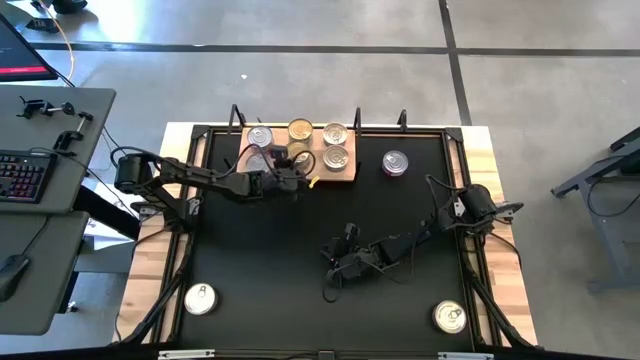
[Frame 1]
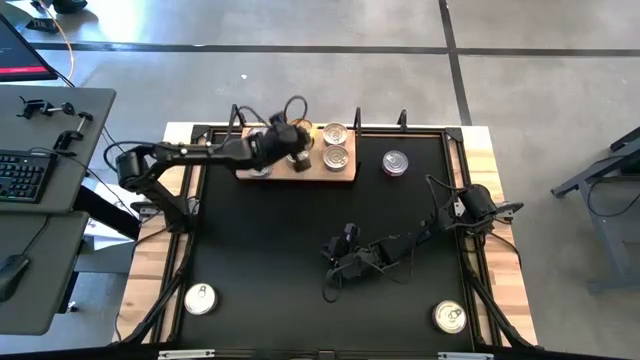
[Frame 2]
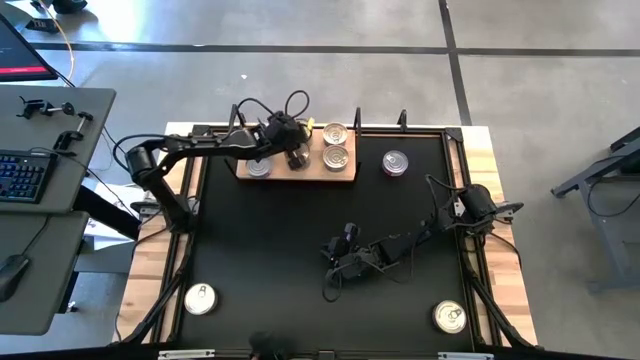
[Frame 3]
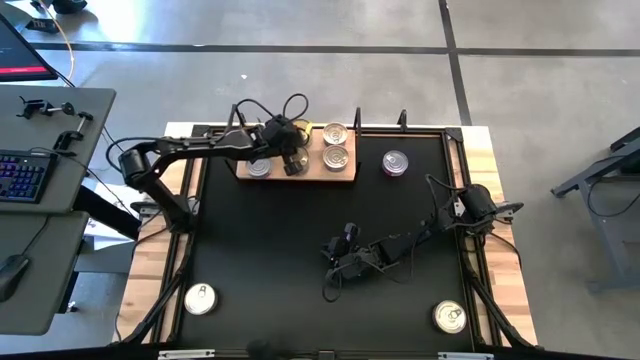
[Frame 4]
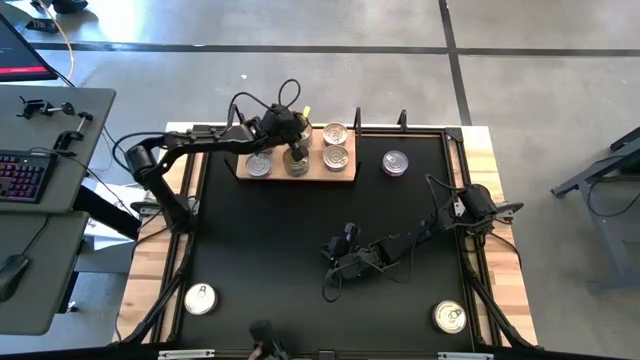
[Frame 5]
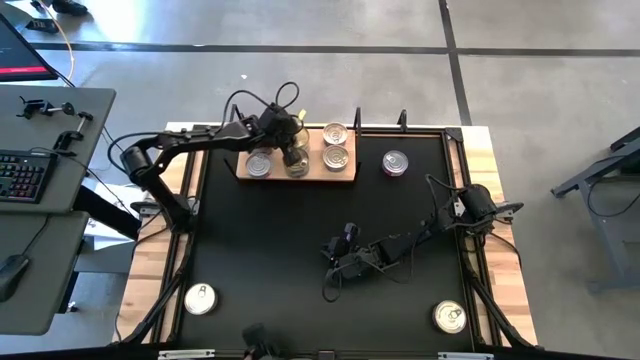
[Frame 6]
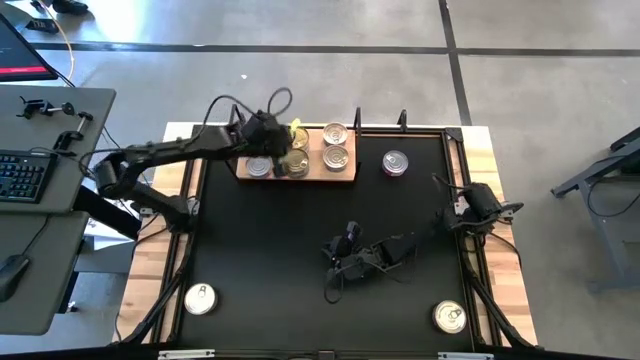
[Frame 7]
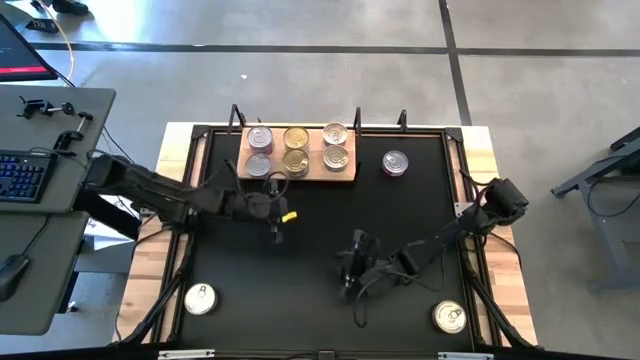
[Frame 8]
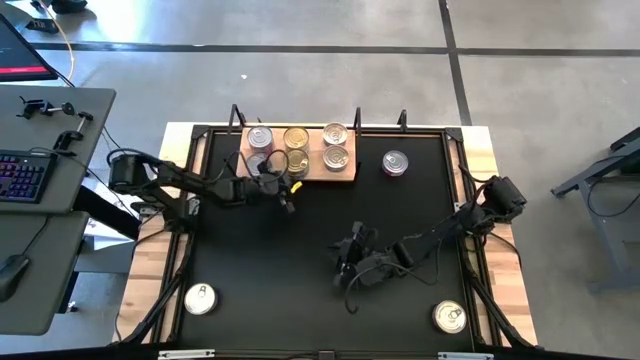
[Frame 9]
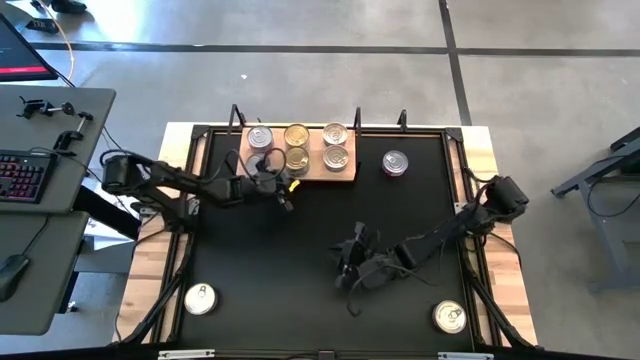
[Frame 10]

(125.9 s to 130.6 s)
Task: Stack canned seafood by type on shelf
Adjust the green cans on the shelf

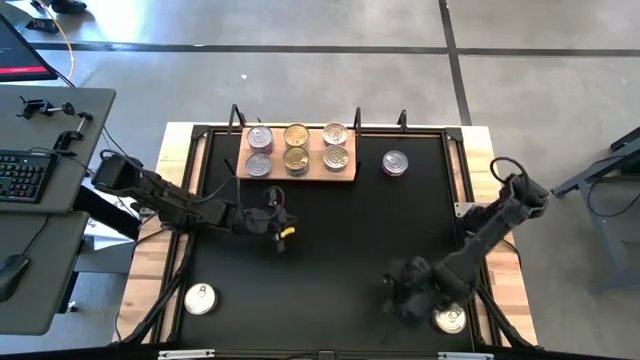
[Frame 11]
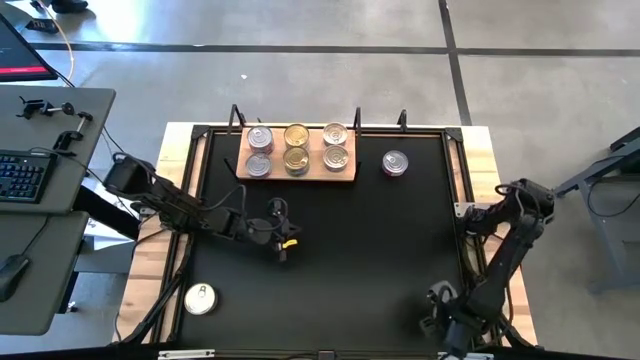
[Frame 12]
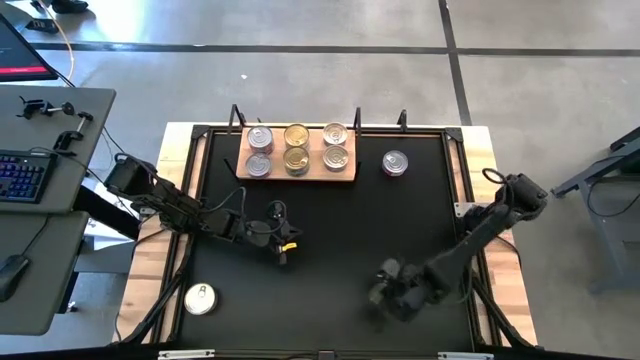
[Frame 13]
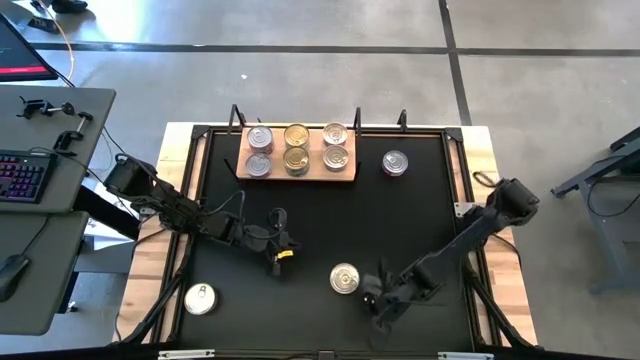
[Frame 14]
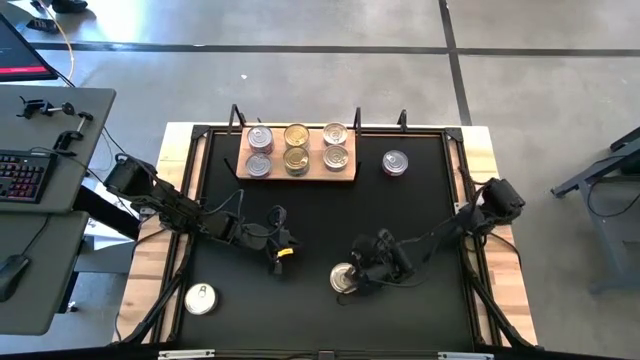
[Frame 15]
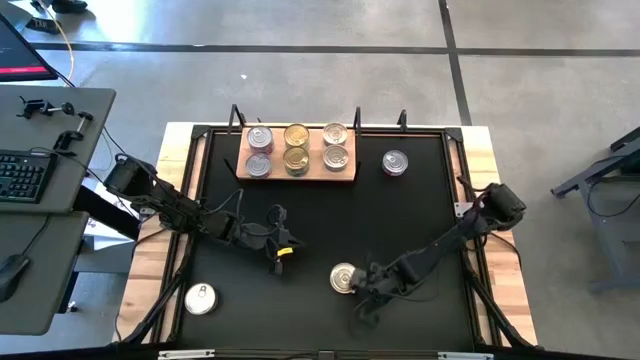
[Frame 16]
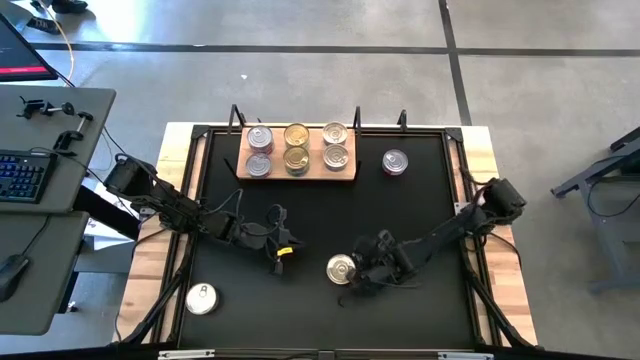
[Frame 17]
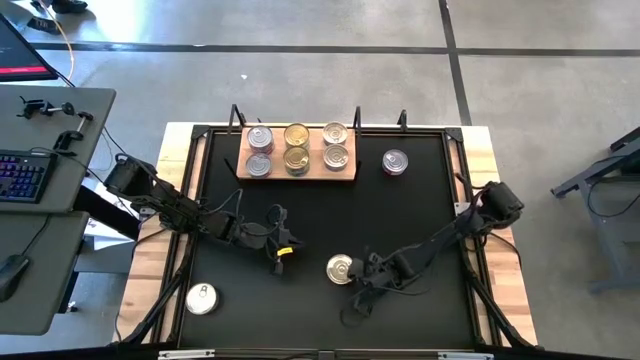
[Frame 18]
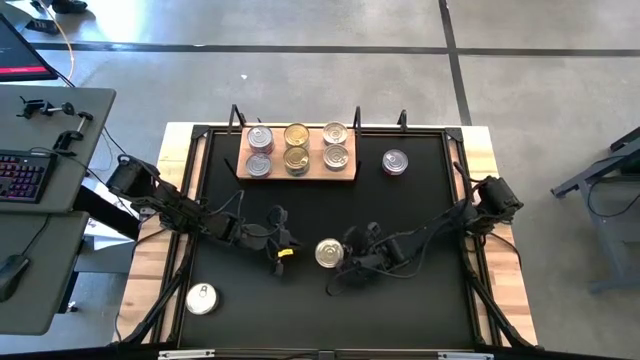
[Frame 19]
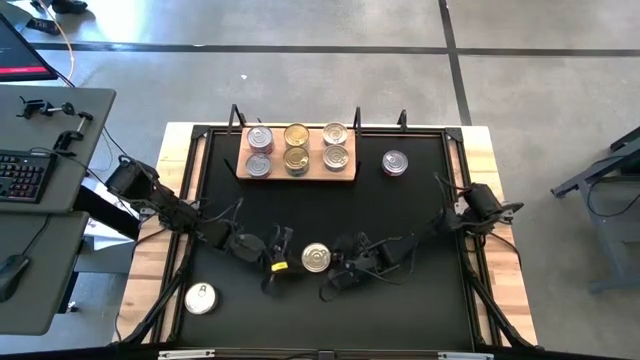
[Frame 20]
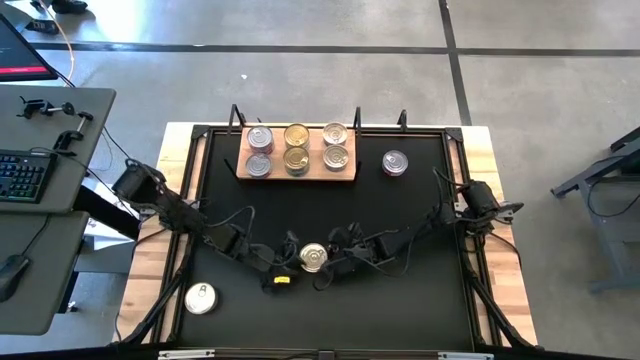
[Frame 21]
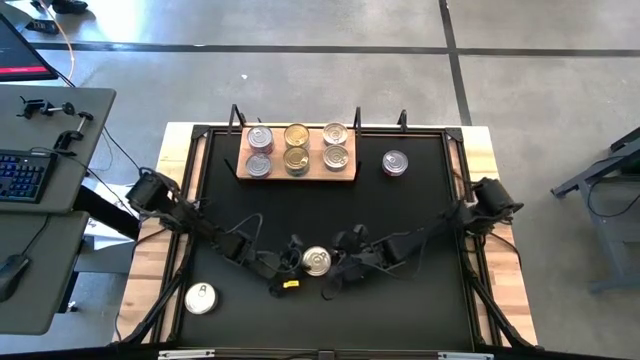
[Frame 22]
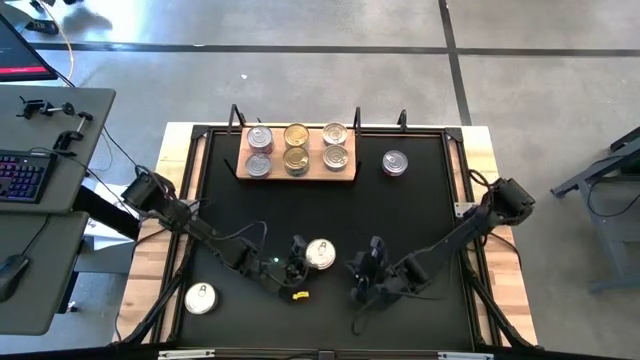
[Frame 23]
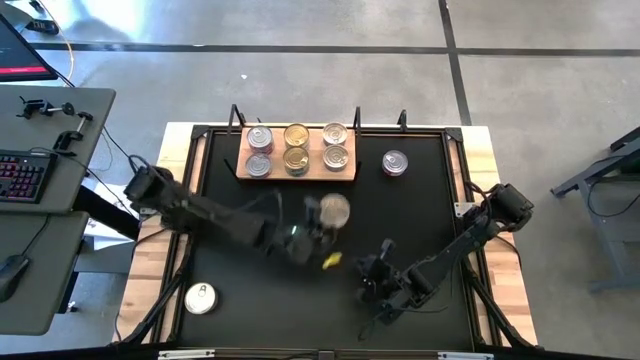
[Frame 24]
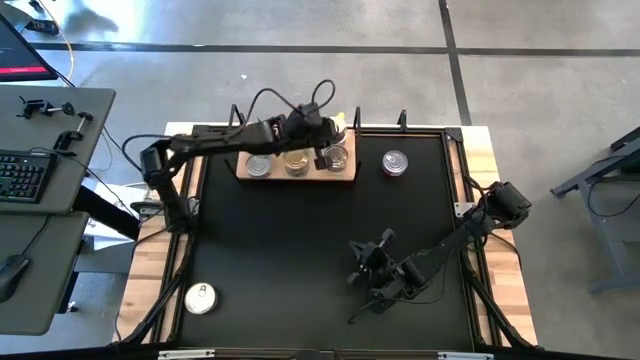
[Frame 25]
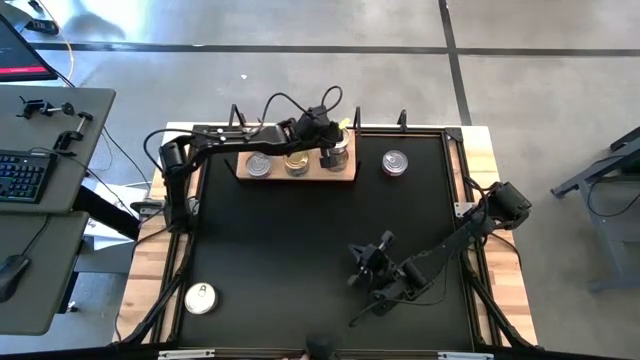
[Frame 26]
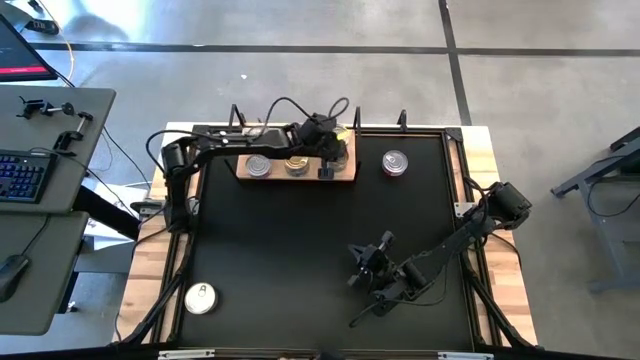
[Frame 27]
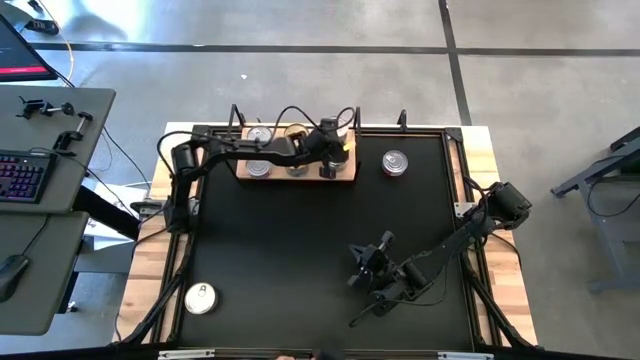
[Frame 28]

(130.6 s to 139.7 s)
Stack the blue pink tuna can on top of the blue pink tuna can on the shelf

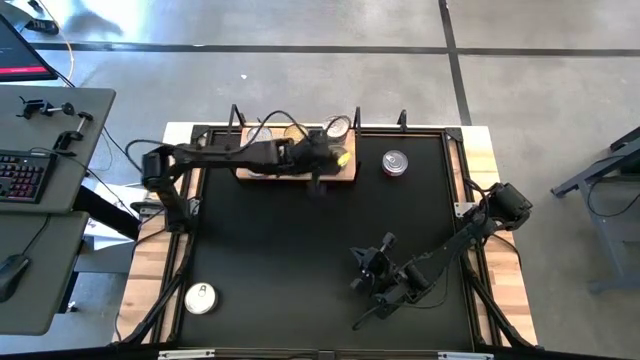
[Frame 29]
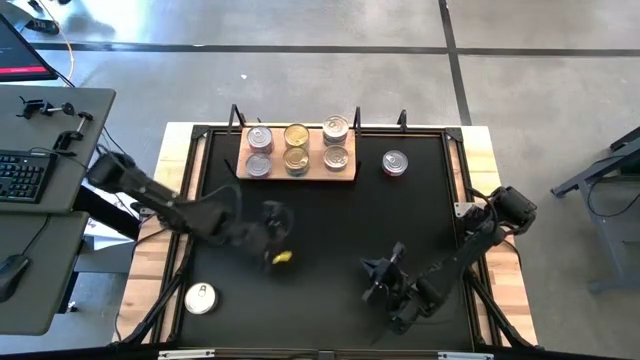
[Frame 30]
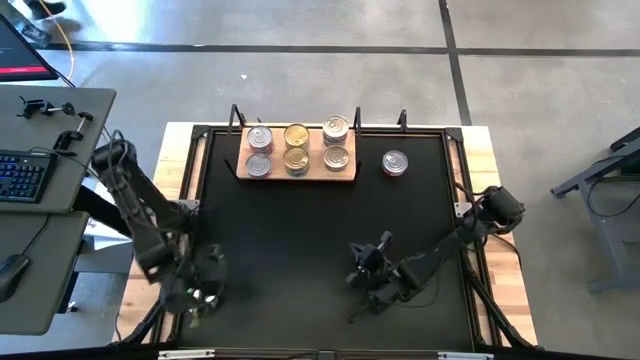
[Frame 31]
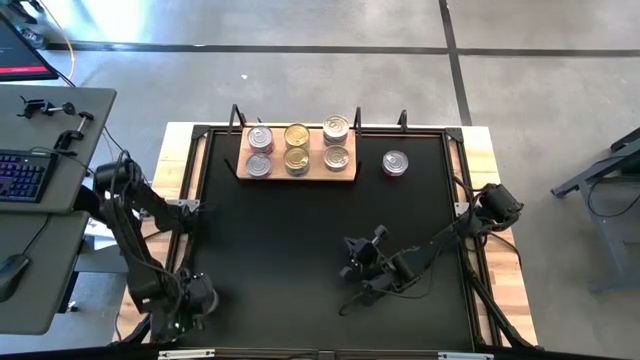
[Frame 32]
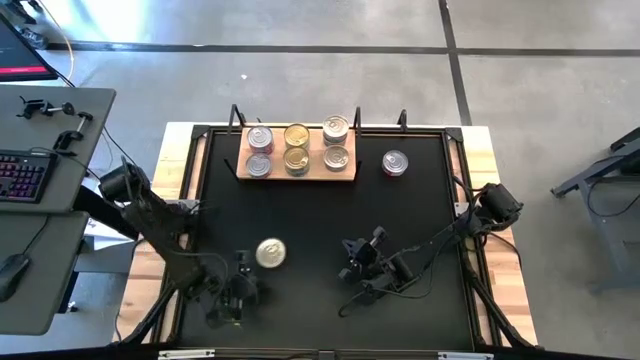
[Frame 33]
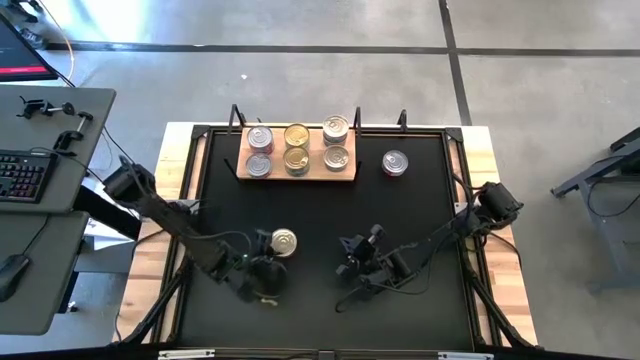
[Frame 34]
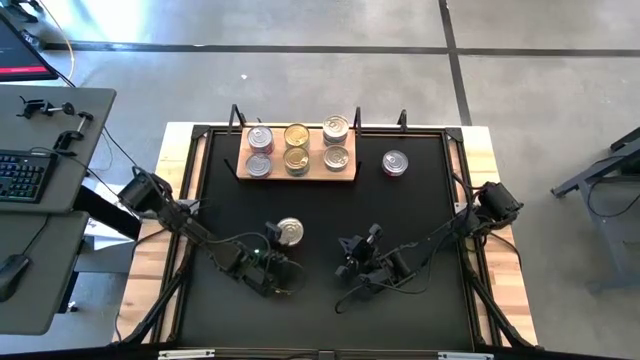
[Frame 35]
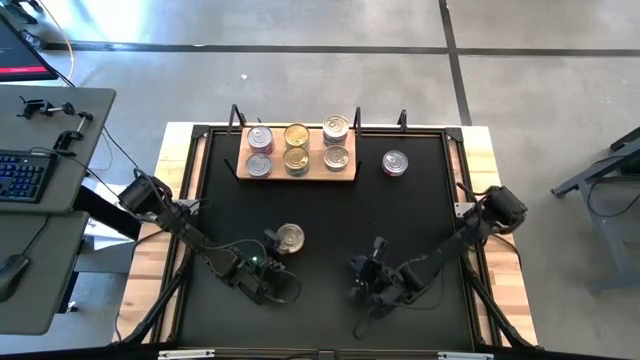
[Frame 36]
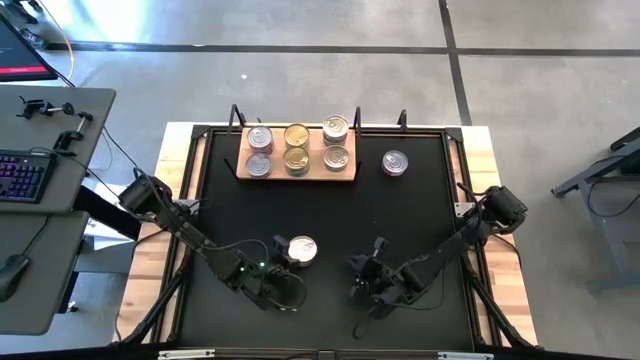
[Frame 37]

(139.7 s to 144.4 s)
Stack the blue pink tuna can on top of the blue pink tuna can on the shelf

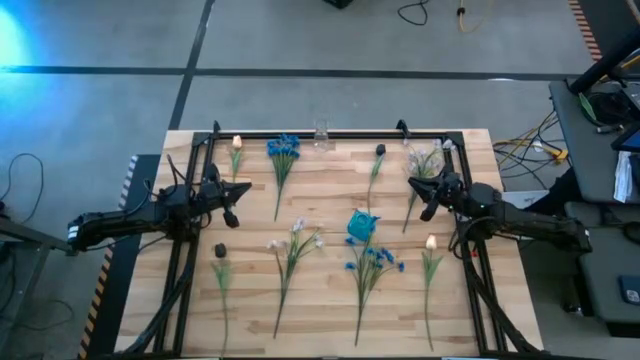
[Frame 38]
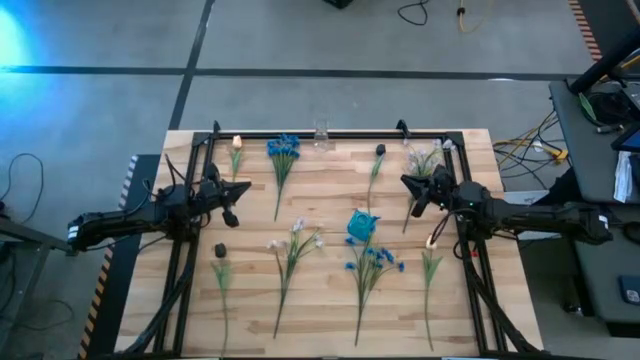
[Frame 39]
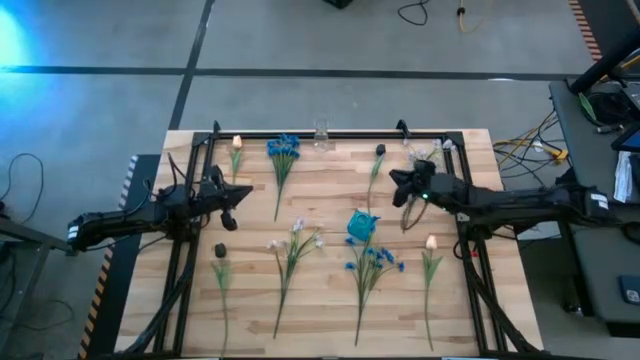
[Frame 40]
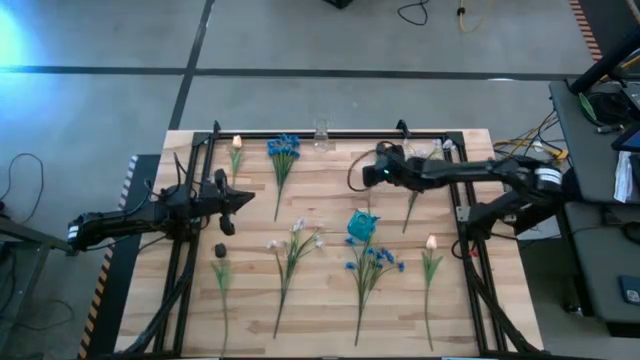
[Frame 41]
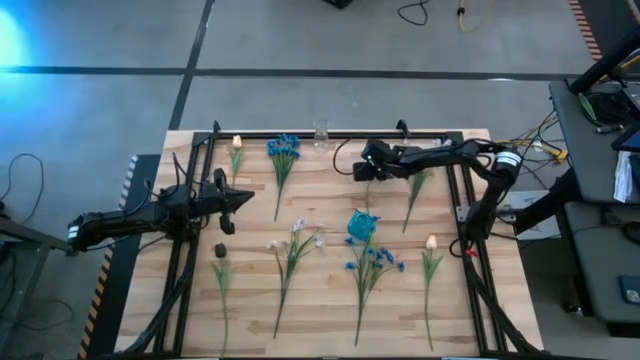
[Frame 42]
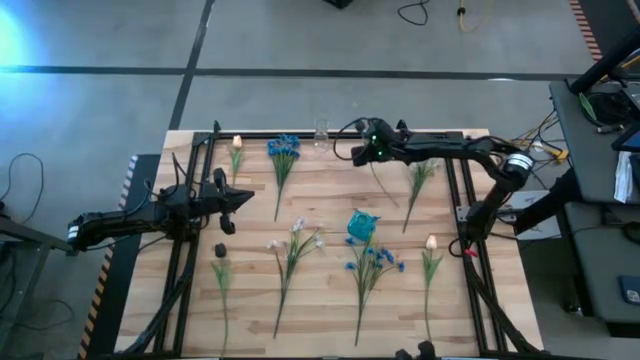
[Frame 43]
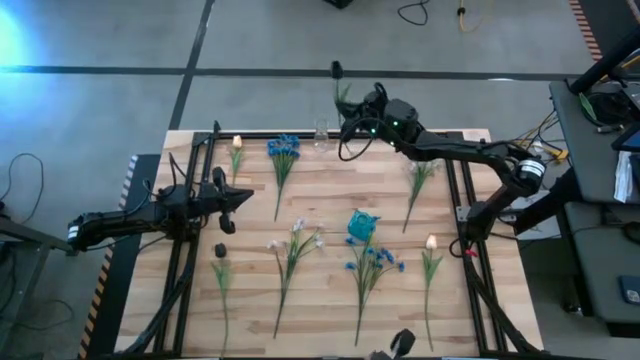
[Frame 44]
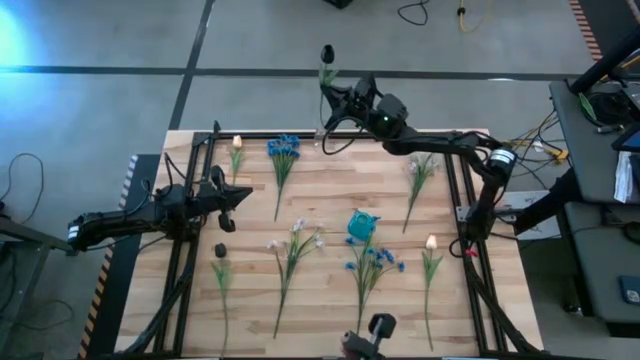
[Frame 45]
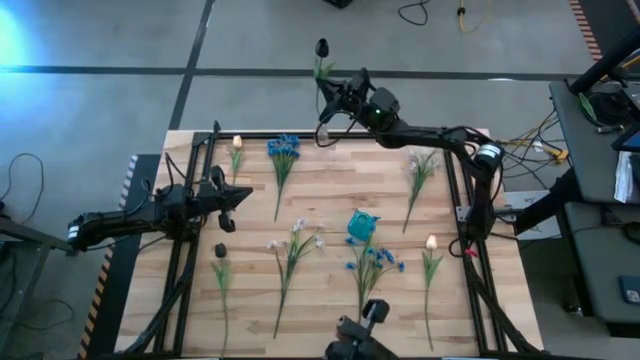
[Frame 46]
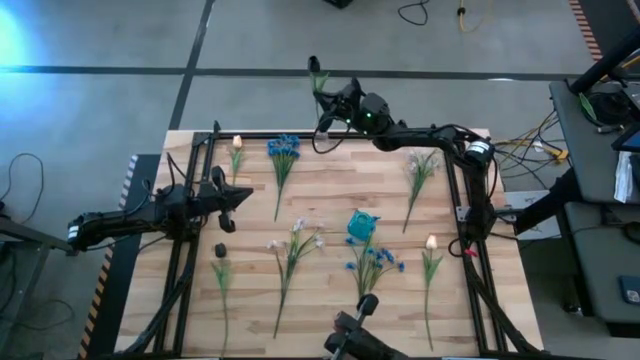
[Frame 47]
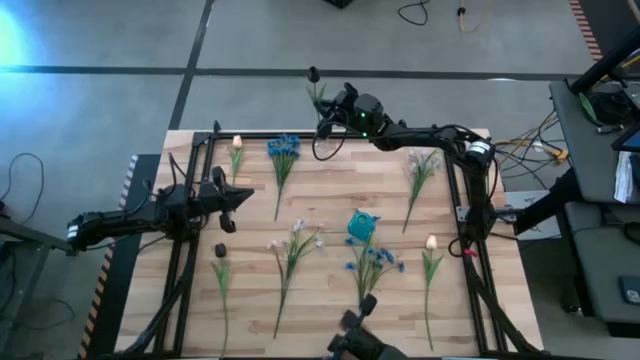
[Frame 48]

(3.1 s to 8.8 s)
Task: Sort flowers into vase by color
Put the top black tulip into the transparent vase
